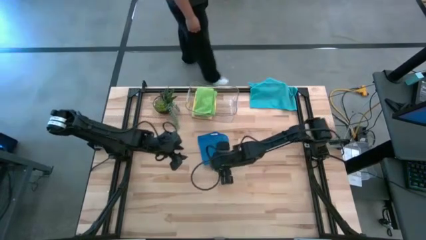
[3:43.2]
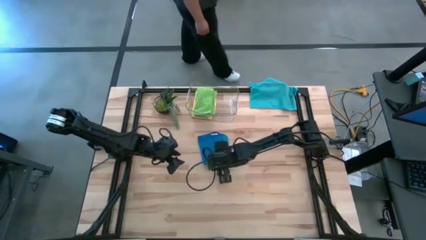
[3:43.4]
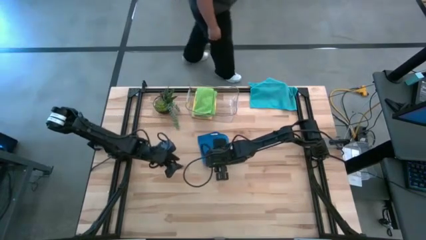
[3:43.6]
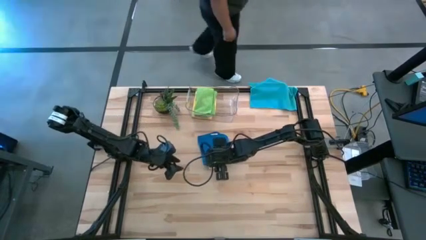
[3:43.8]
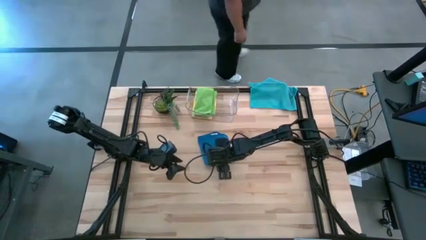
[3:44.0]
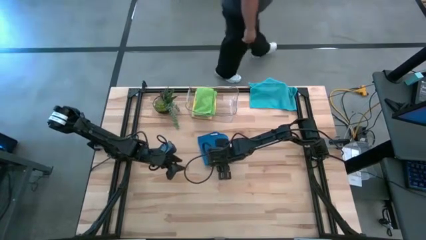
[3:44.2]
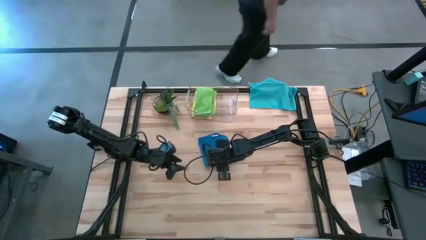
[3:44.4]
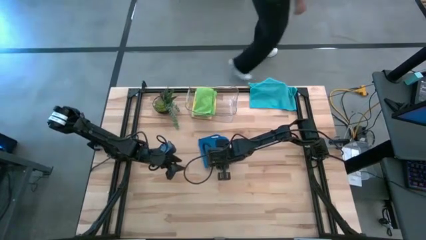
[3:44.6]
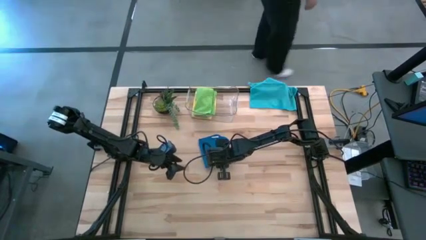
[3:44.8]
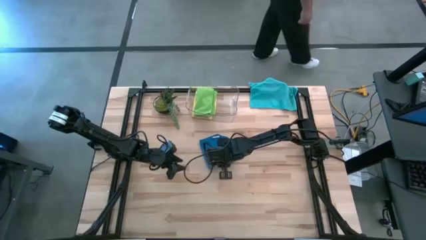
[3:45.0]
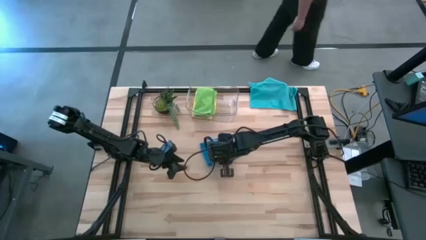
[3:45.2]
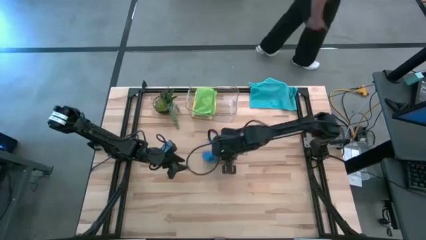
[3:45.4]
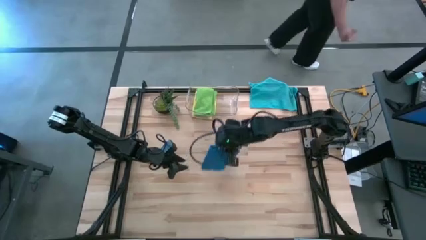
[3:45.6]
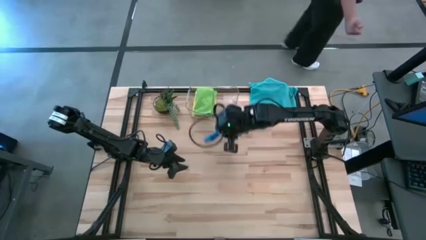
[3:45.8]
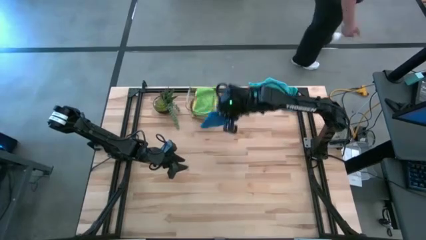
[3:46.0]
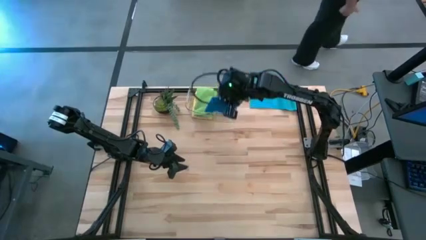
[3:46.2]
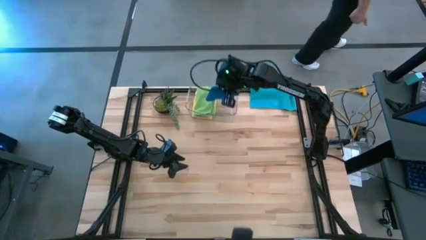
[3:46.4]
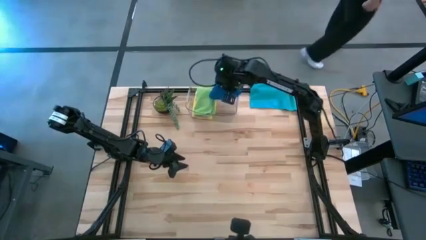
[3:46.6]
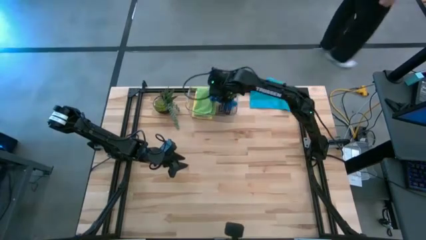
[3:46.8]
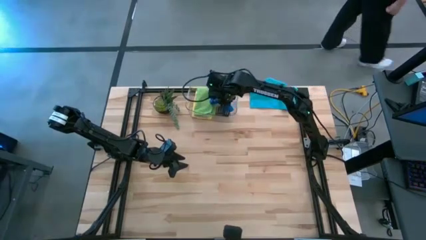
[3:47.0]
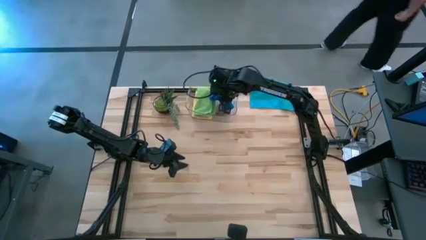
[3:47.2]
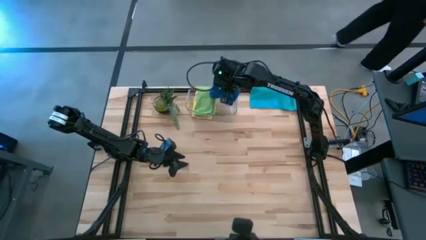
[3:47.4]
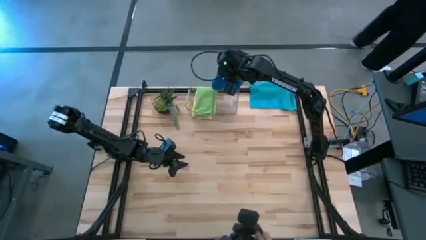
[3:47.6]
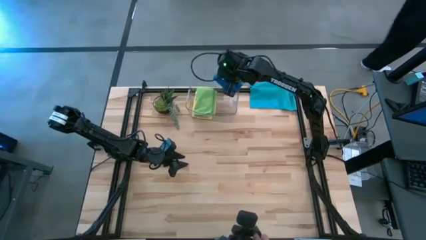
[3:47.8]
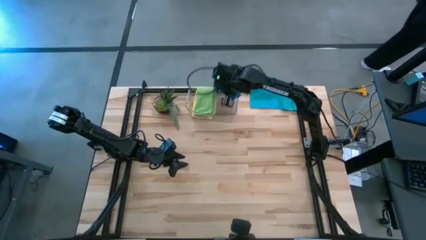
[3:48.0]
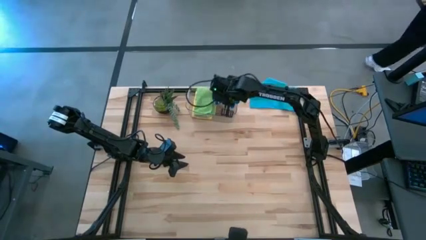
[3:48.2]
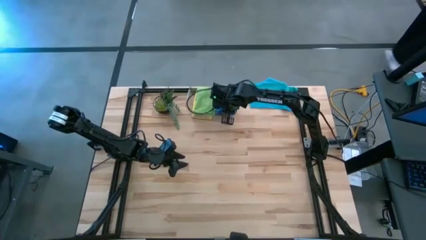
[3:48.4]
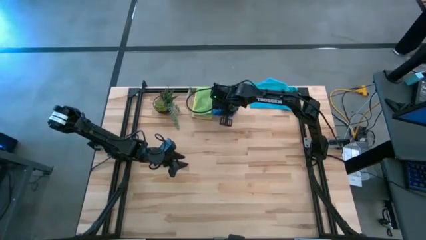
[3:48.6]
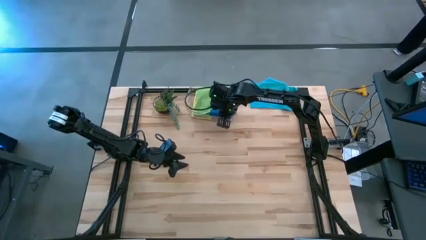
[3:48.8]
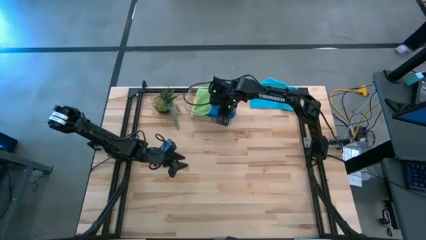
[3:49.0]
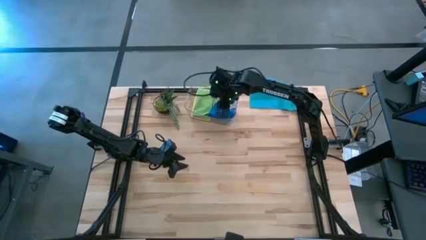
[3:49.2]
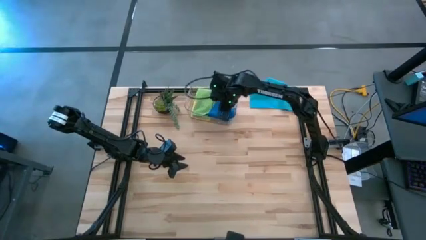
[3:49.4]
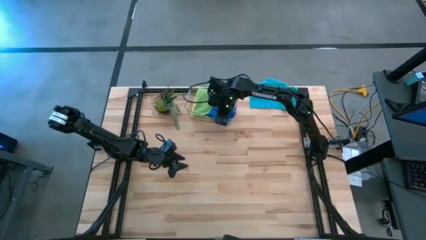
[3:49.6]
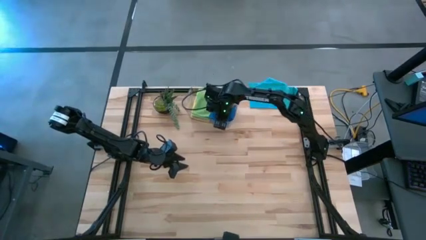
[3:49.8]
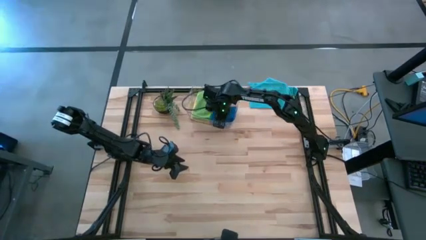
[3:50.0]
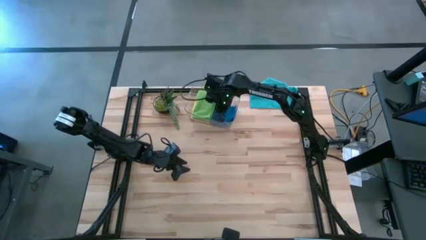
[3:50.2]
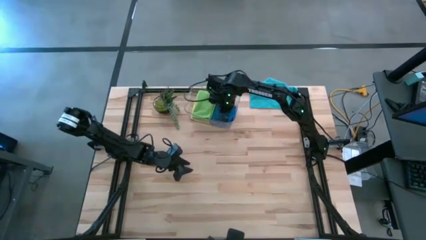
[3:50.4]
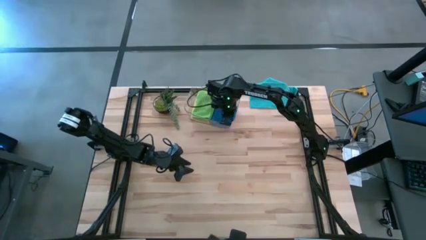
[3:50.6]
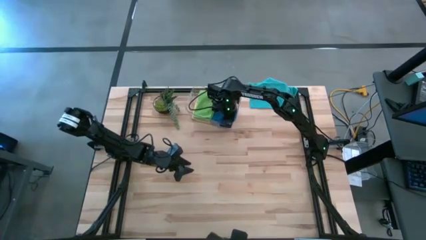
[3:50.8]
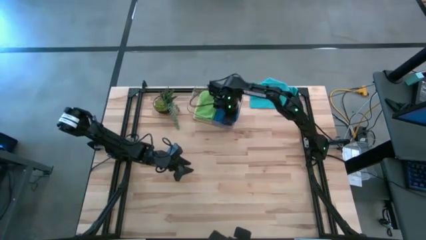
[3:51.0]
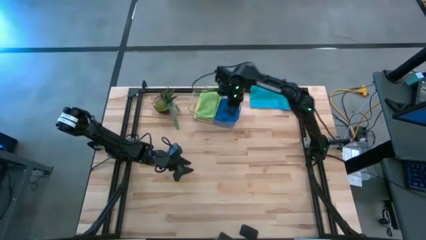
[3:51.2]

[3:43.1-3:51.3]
Task: Fold microfiber towels
Put the bottom blue towel into the bin

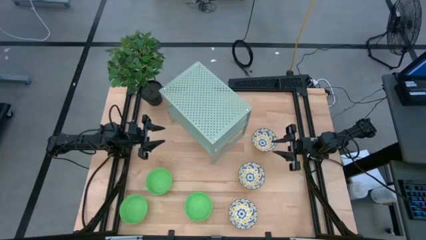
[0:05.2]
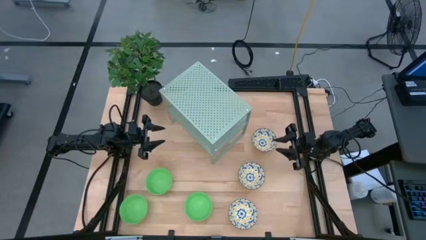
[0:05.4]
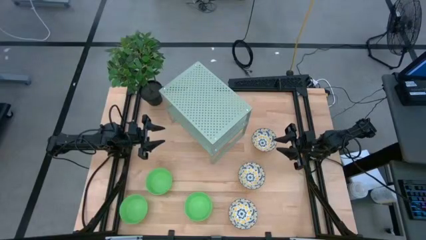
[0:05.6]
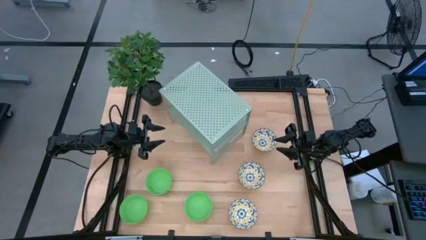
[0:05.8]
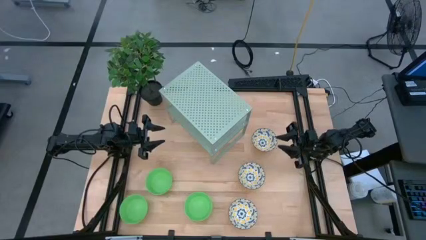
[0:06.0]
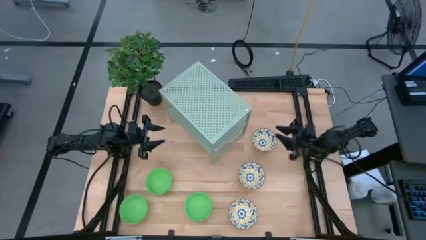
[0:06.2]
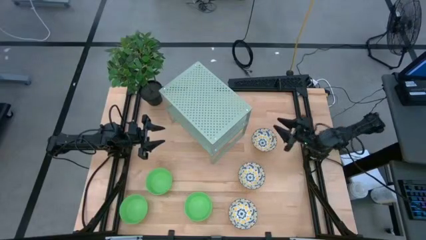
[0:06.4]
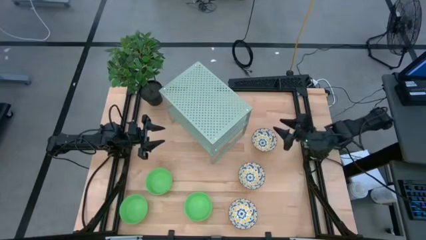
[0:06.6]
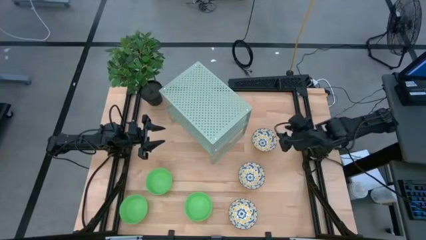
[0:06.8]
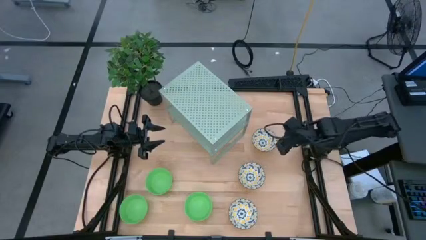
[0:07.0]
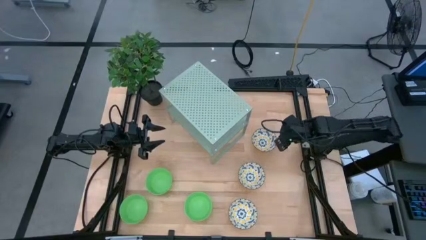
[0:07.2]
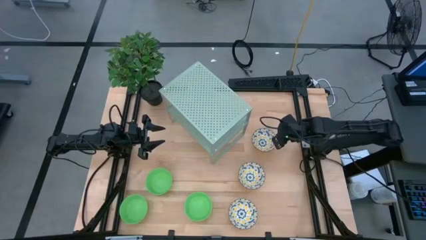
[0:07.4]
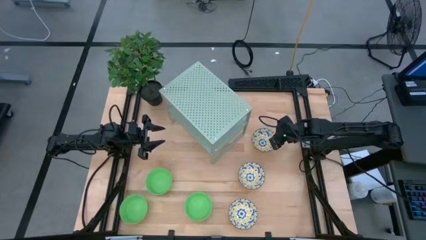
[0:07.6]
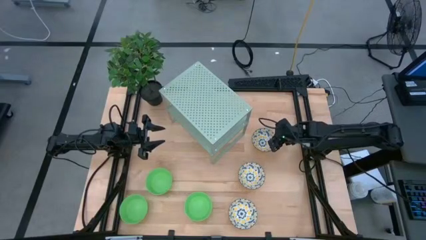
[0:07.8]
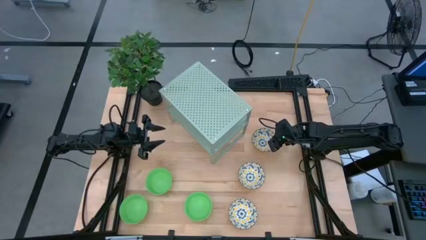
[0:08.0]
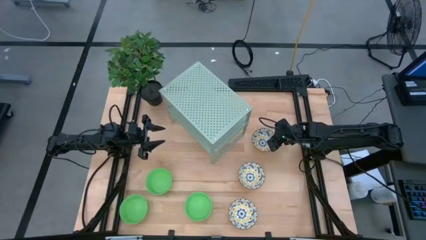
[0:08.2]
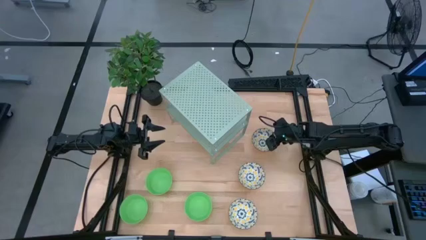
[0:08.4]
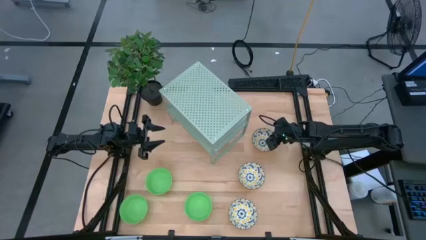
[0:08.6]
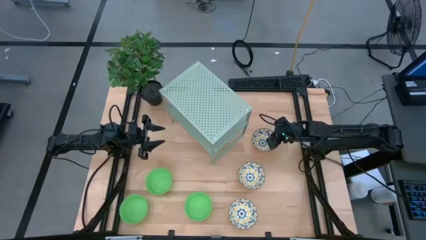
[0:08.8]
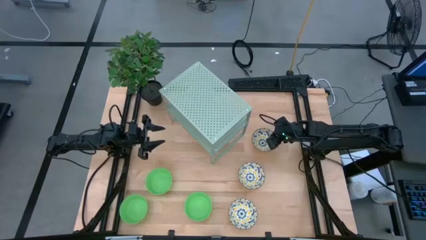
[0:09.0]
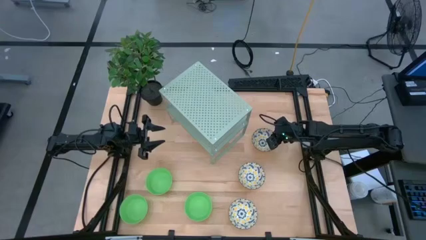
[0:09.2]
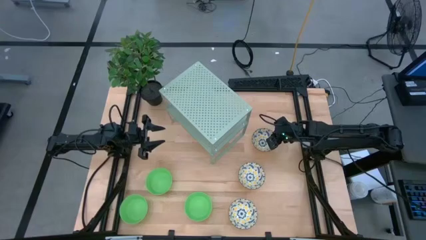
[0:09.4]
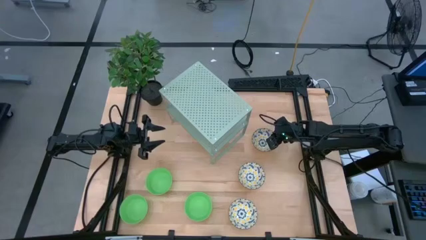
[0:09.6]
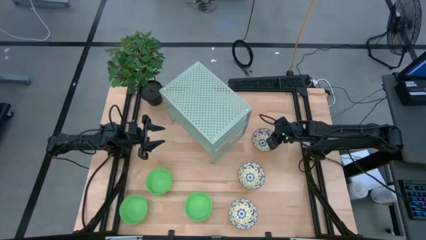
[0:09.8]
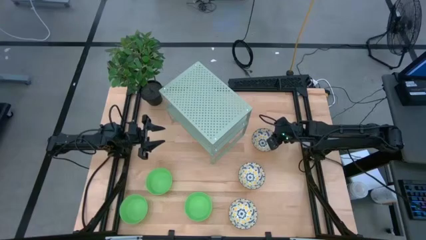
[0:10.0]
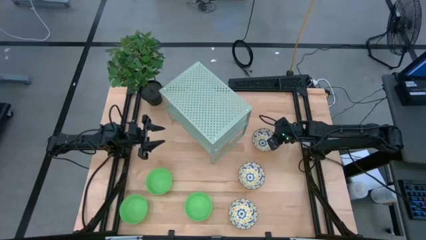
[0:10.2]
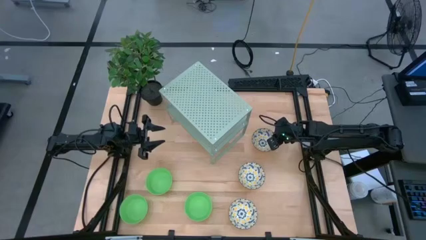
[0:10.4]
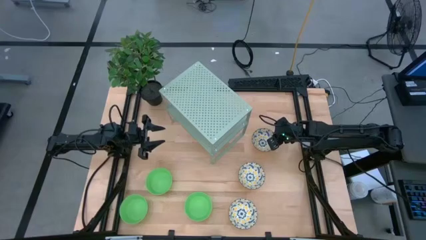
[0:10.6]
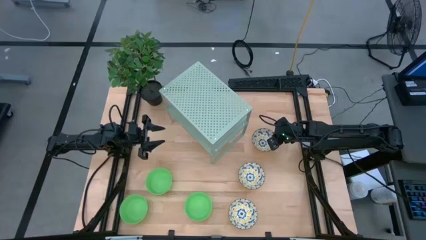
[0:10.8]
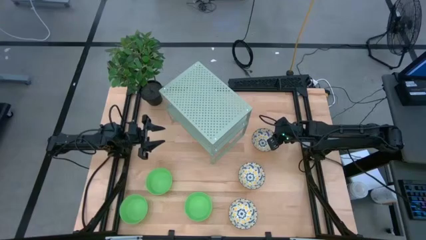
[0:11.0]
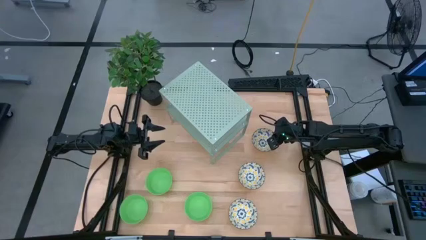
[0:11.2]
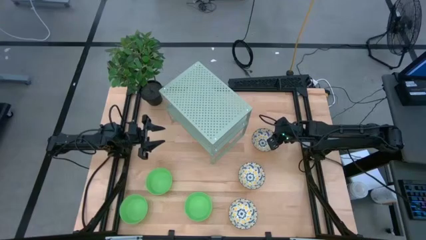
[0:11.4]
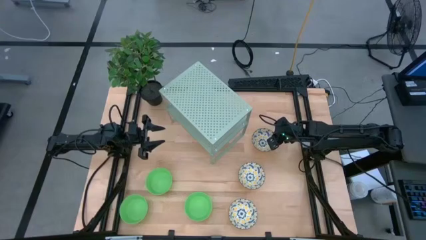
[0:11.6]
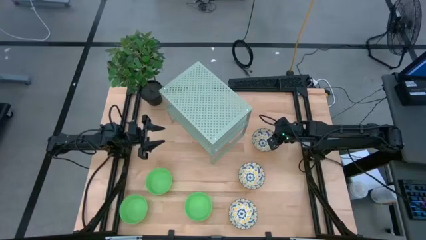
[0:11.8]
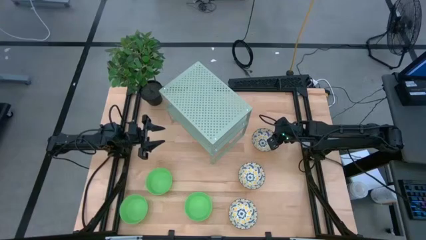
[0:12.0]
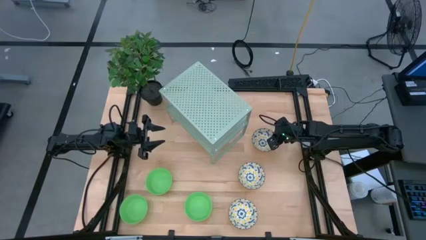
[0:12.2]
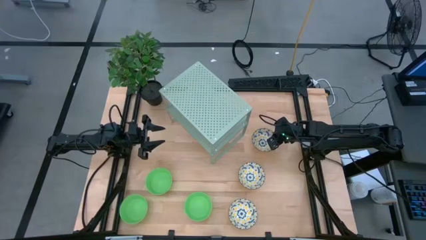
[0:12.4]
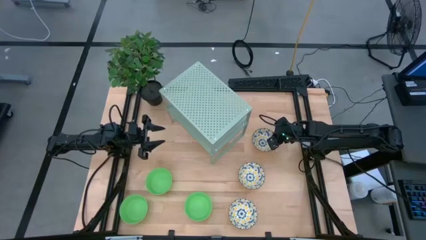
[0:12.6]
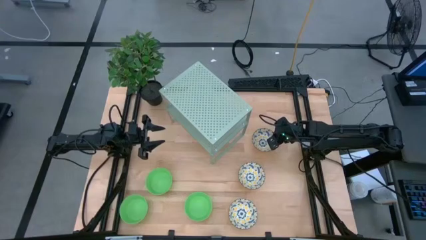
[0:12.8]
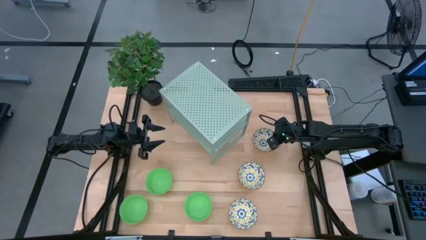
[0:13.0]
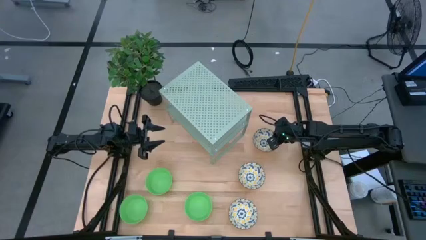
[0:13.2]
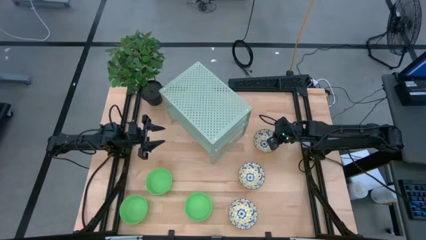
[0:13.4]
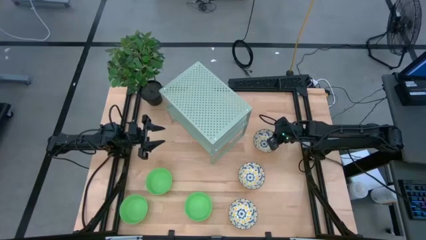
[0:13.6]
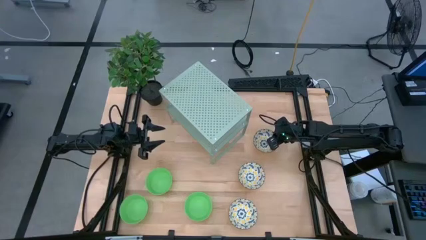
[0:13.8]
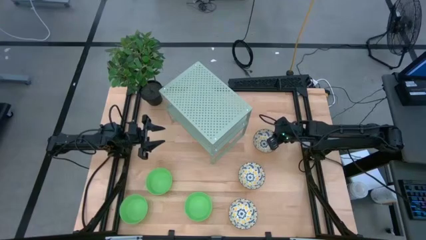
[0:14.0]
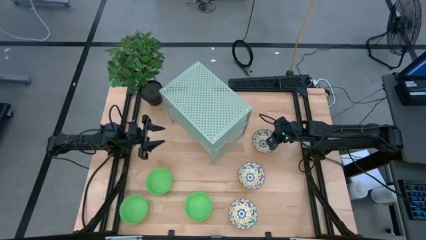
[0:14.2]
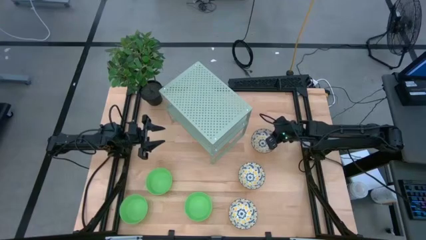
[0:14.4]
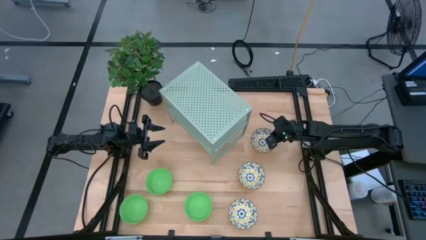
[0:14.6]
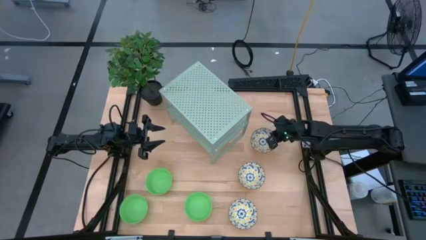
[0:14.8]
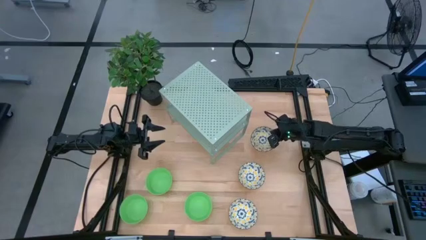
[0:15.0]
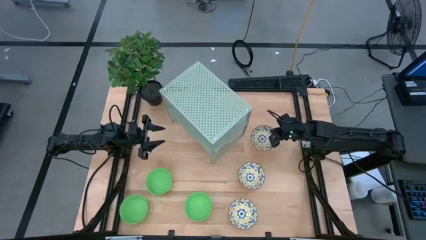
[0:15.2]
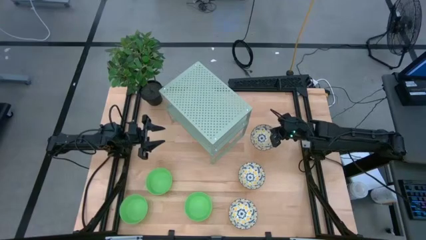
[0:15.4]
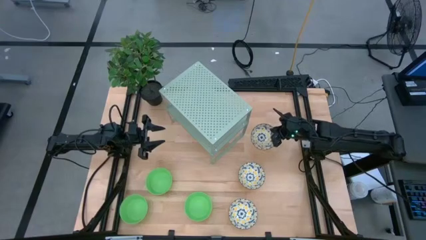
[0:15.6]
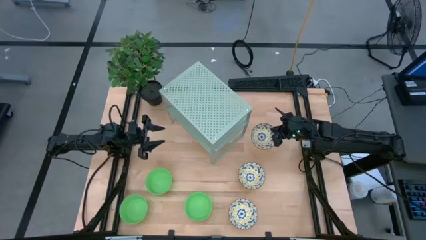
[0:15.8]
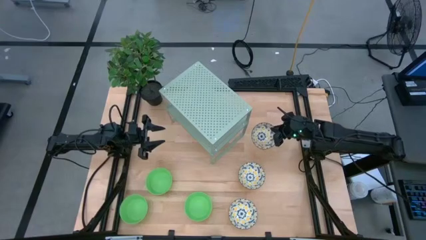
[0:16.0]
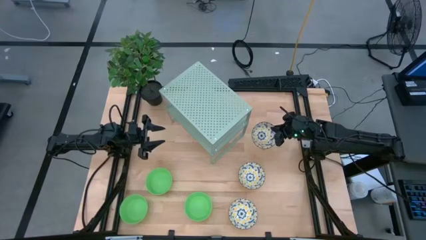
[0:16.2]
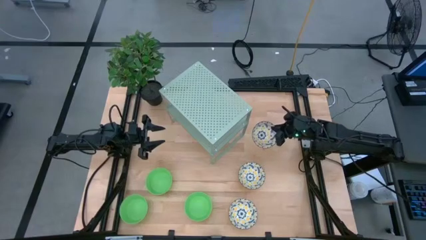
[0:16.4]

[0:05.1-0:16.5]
Task: Pick & Place Mini bowls
Put the top yellow patterned bowl on the shelf
